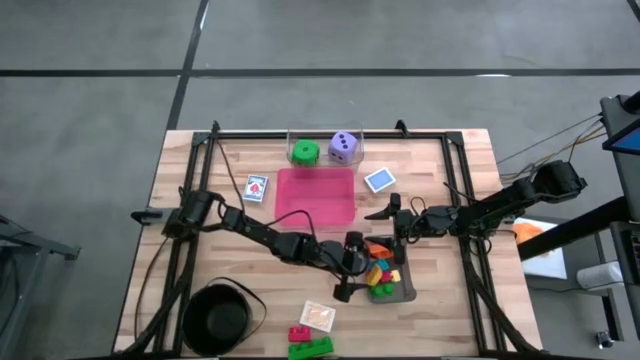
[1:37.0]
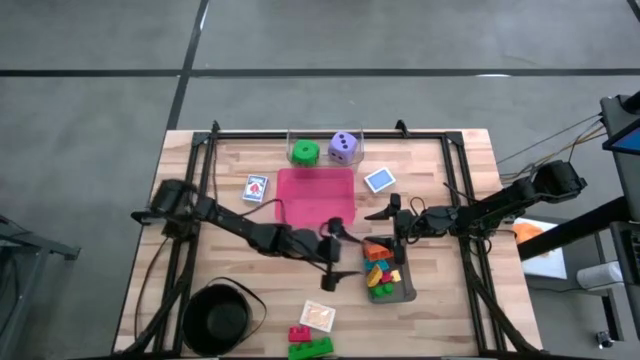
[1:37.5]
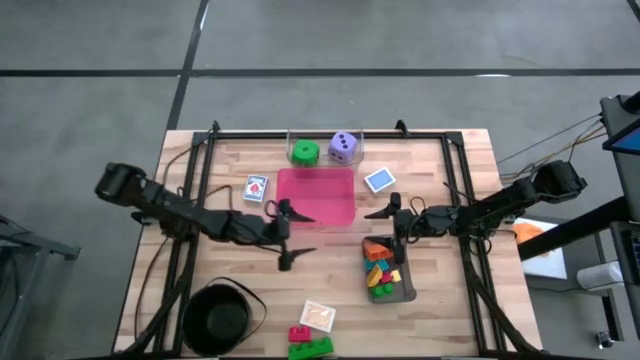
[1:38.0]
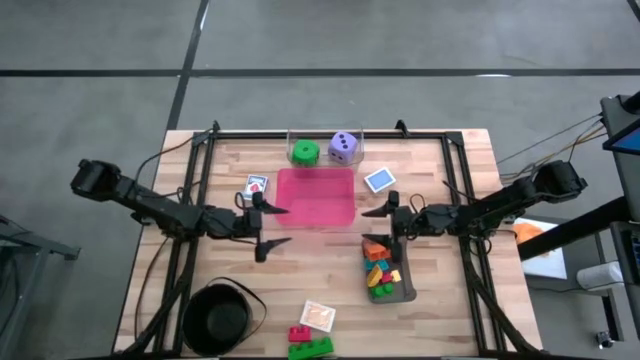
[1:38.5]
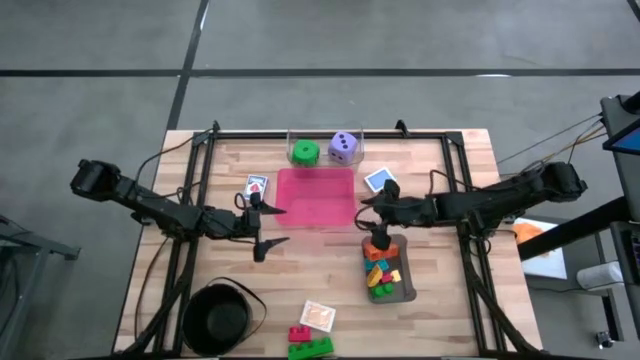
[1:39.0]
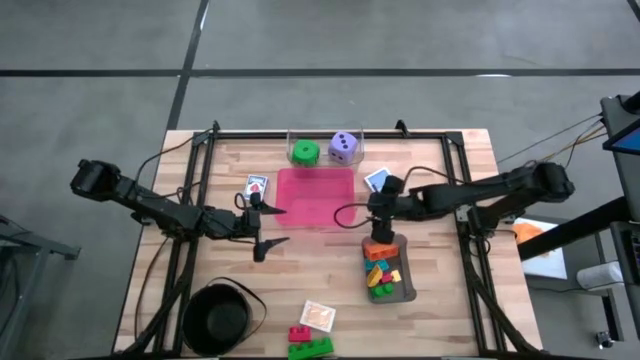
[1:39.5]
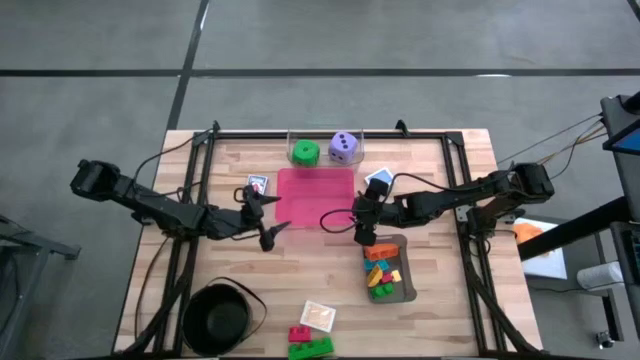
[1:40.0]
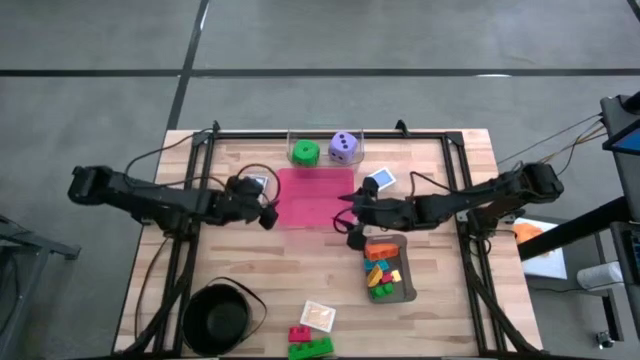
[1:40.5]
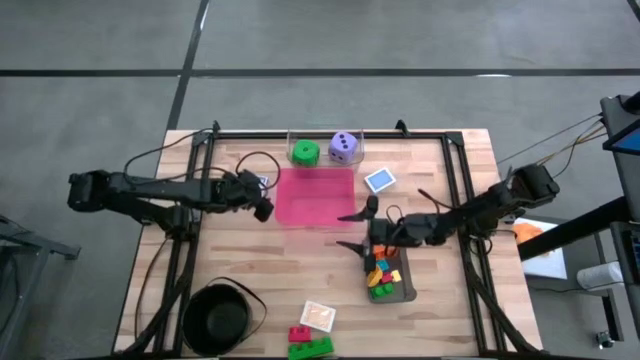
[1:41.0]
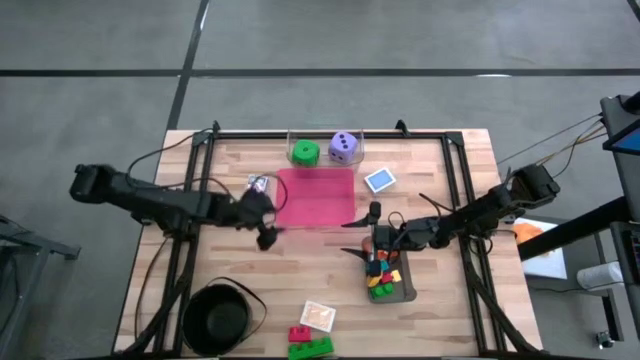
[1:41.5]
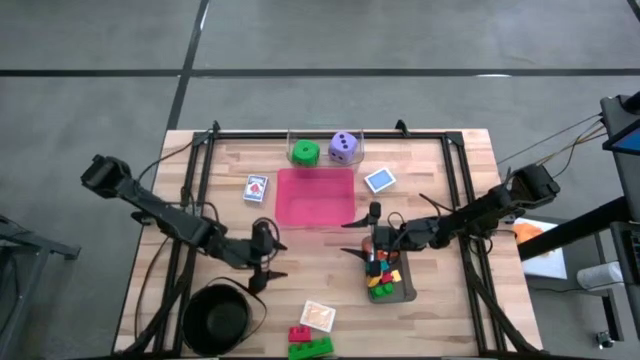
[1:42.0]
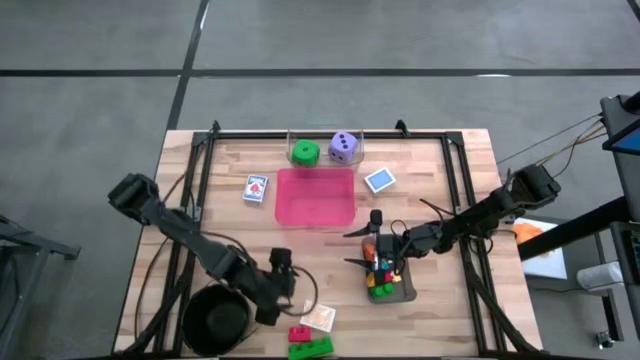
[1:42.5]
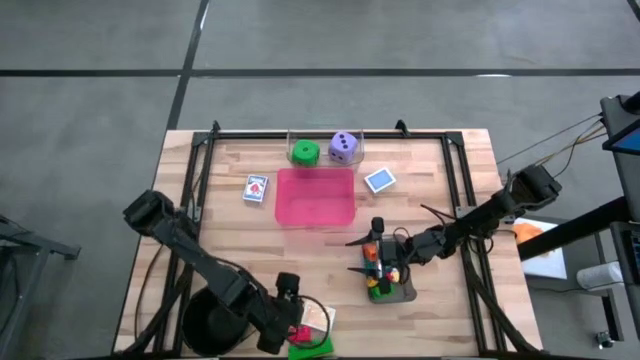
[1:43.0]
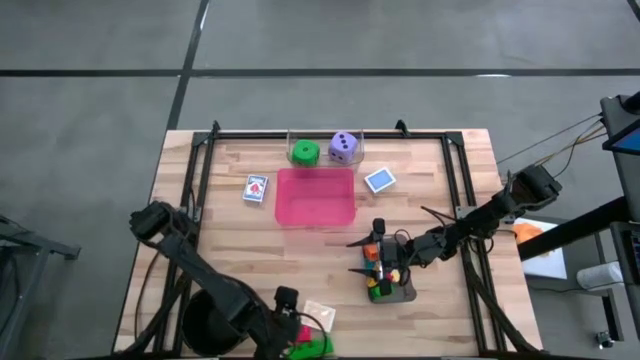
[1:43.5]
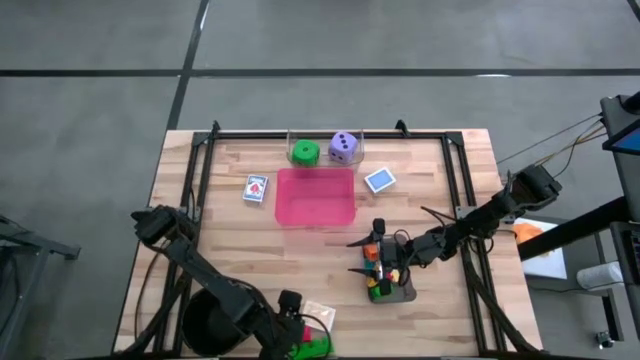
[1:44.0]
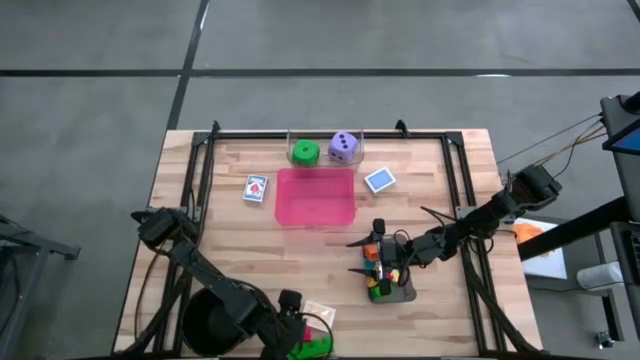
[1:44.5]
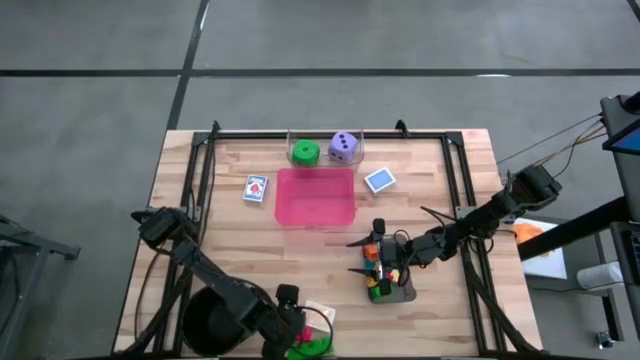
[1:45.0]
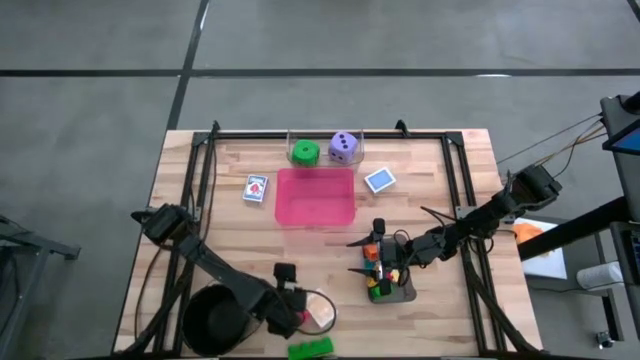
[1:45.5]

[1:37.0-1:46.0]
Task: Pick & Place Toys
Adjust the big red game piece

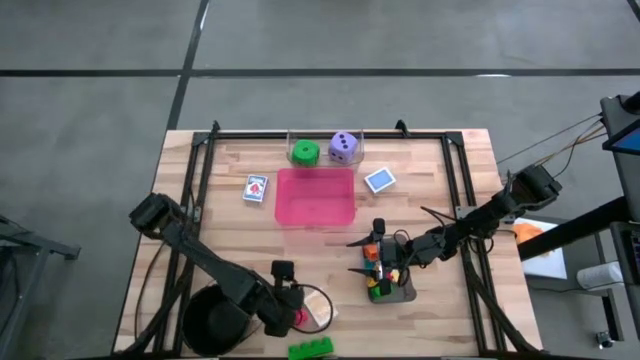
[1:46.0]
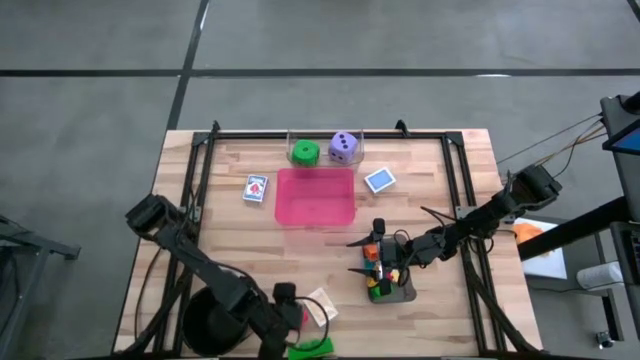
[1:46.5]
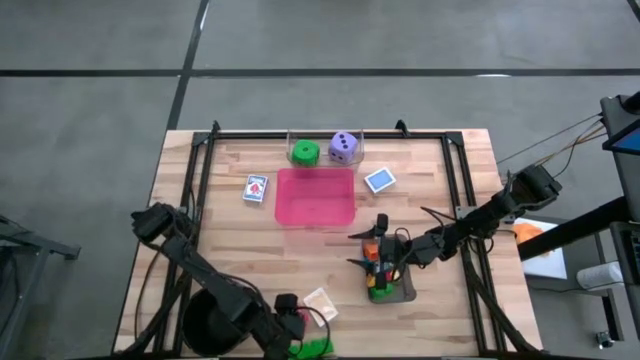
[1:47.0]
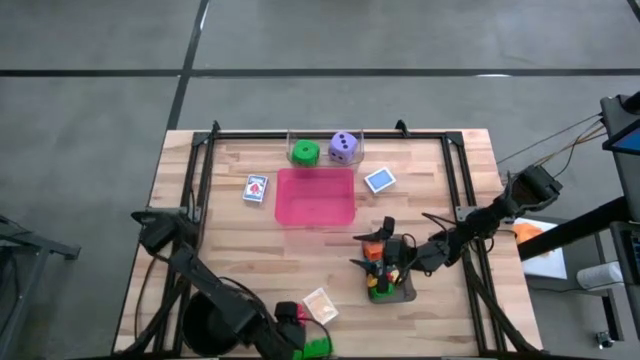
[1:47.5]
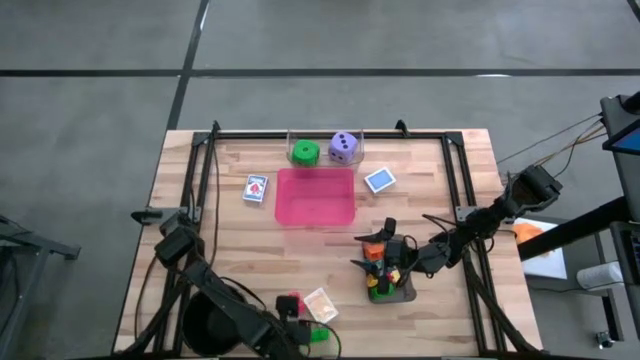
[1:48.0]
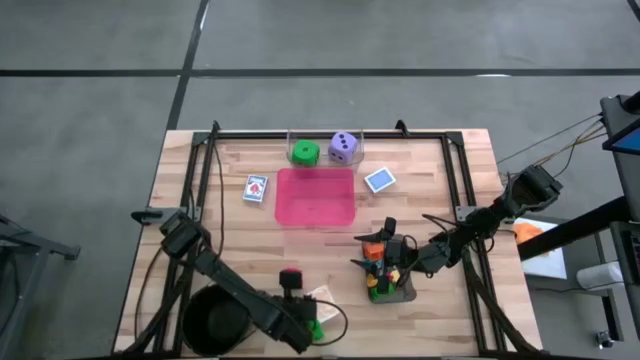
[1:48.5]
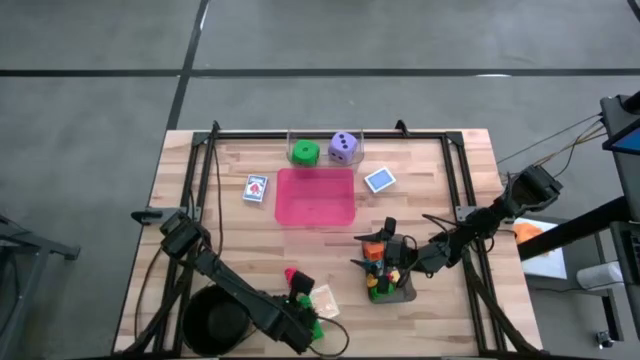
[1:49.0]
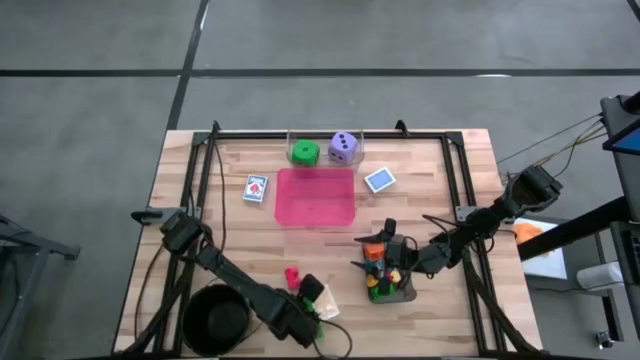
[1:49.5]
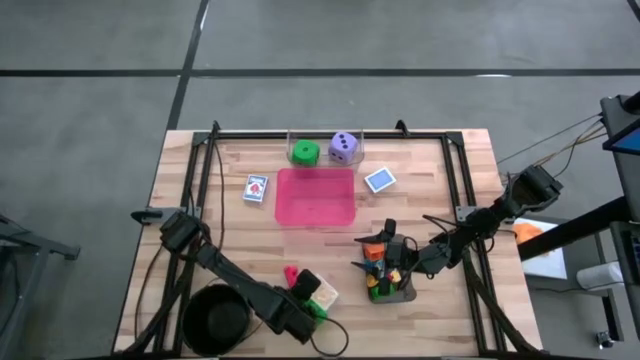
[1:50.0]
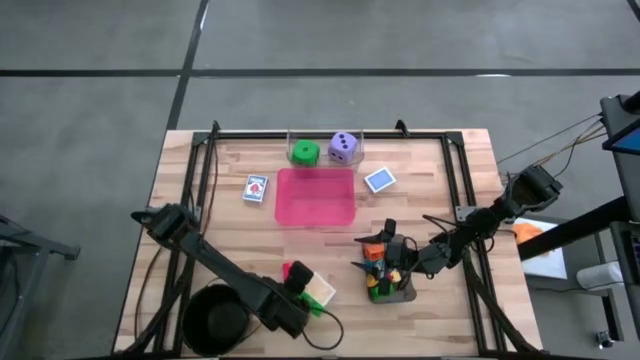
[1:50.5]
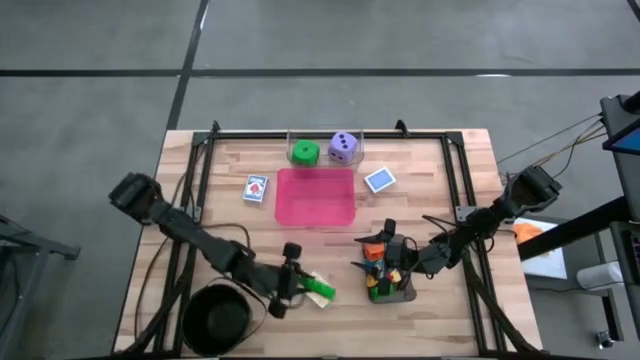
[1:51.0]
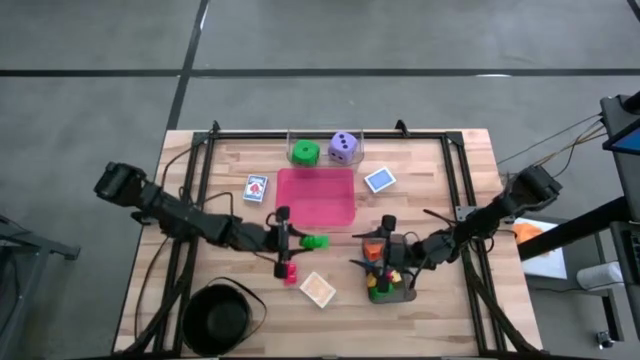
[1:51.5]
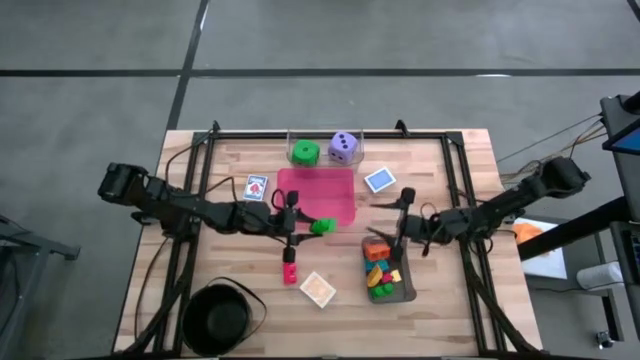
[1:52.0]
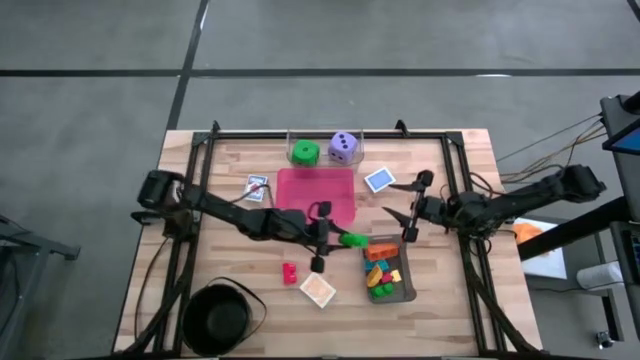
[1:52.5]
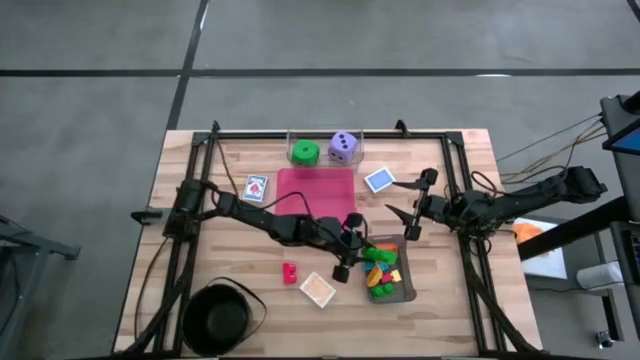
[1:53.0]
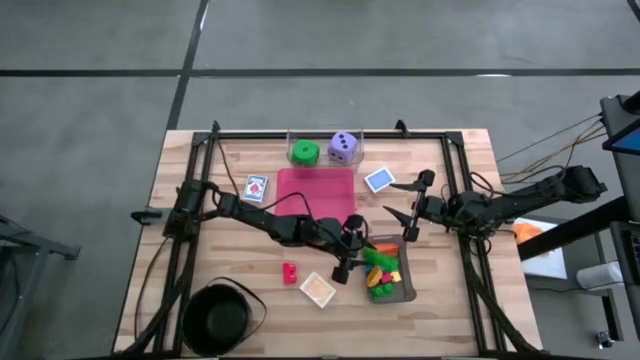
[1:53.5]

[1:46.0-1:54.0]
Put the big green game piece into the black bin

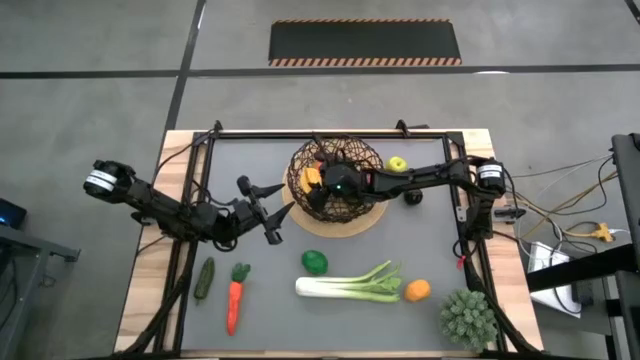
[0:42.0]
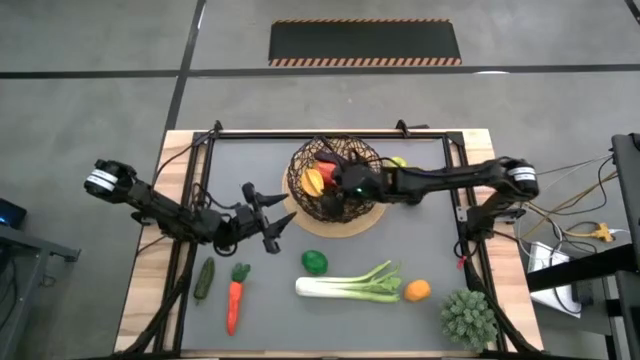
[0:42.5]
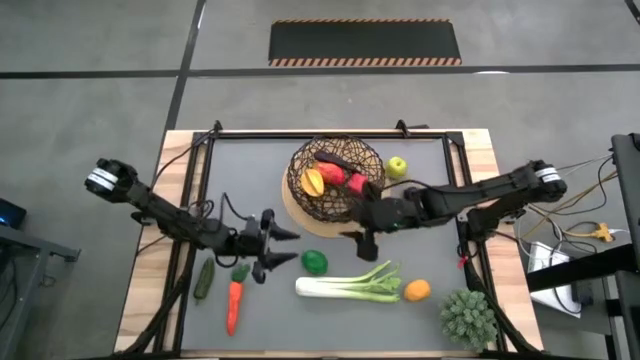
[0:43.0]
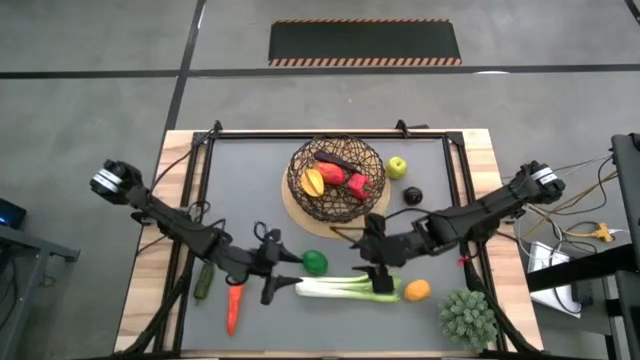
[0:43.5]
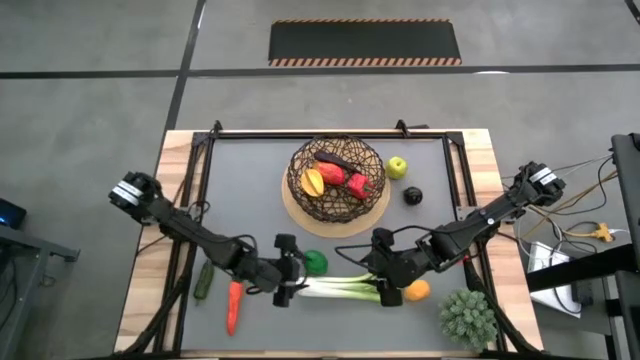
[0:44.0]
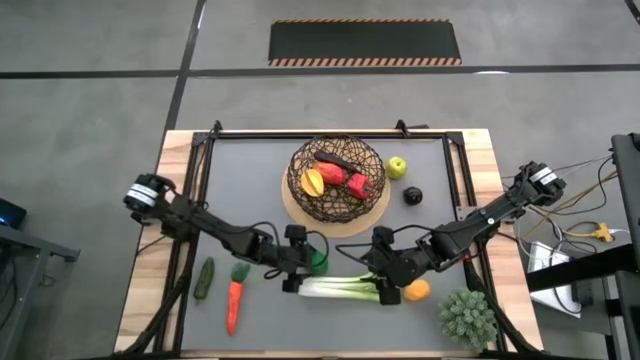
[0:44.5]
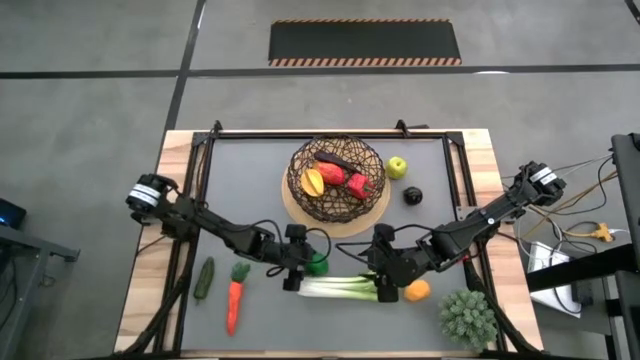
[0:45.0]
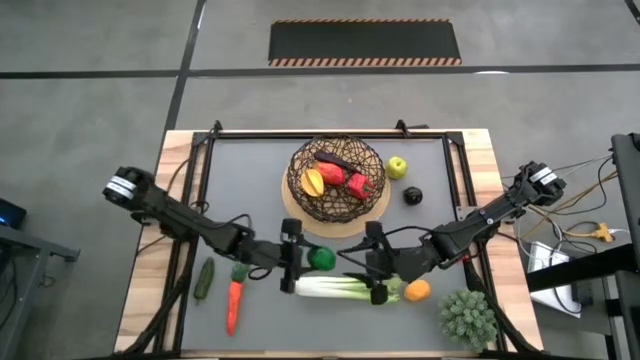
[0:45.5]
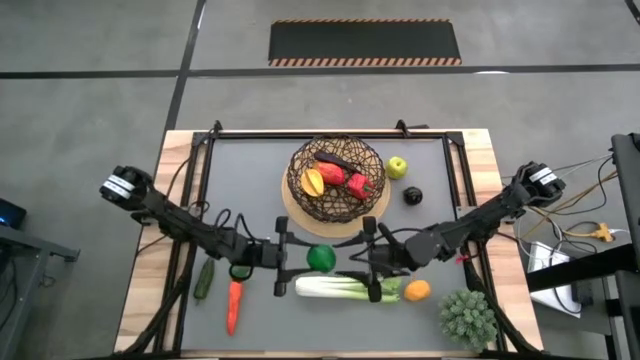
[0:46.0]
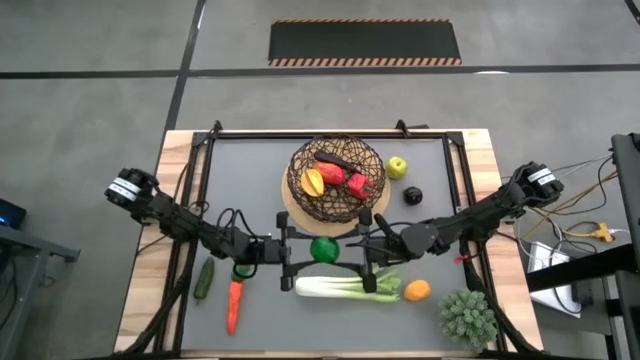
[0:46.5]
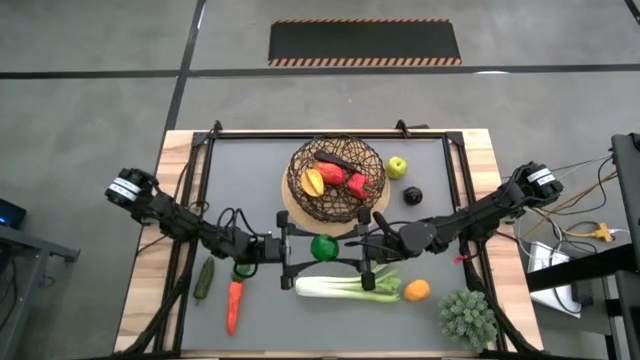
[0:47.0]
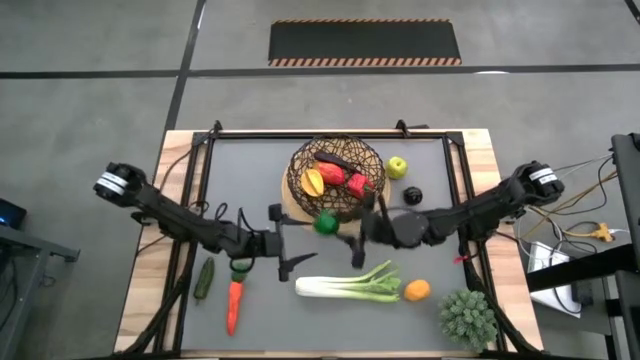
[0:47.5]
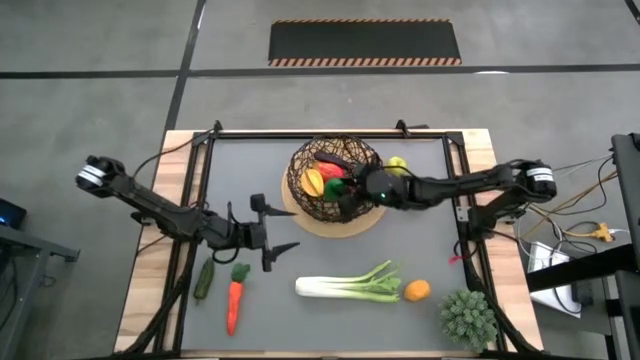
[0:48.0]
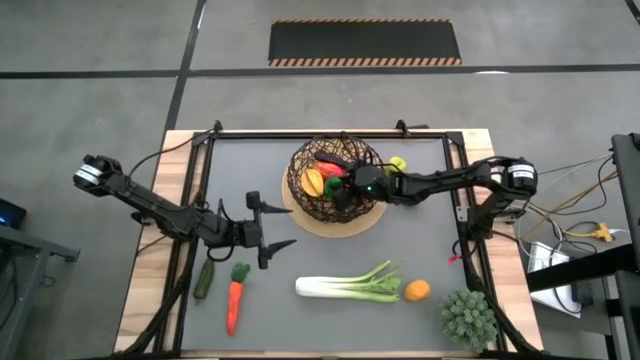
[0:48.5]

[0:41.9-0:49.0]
Task: Build produce basket
Put the lime into the basket
